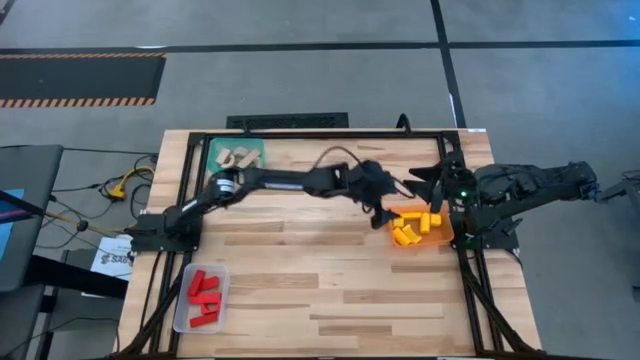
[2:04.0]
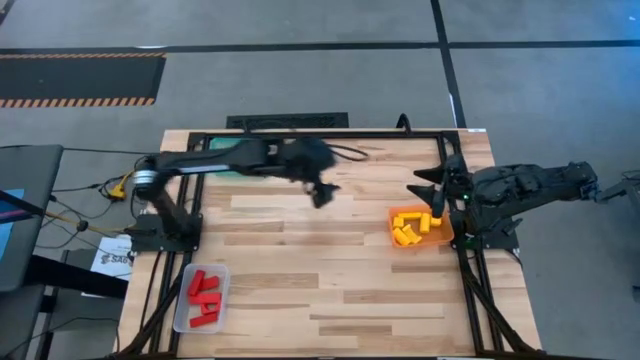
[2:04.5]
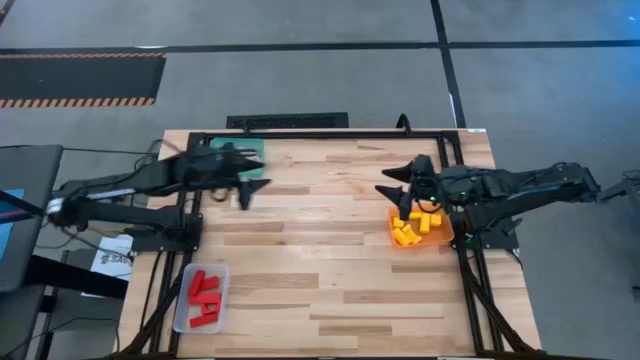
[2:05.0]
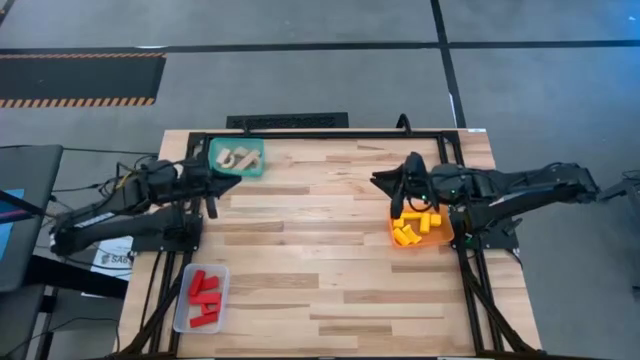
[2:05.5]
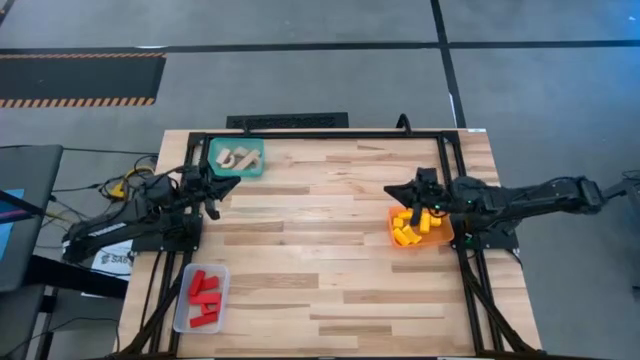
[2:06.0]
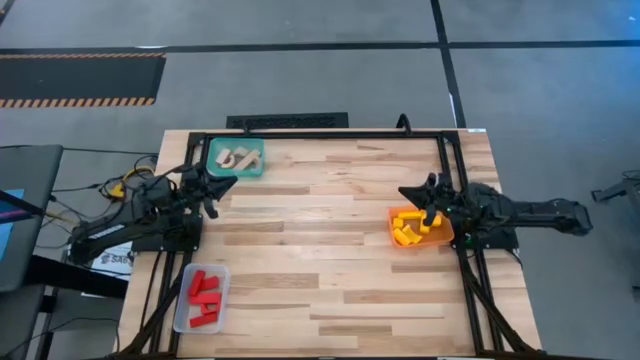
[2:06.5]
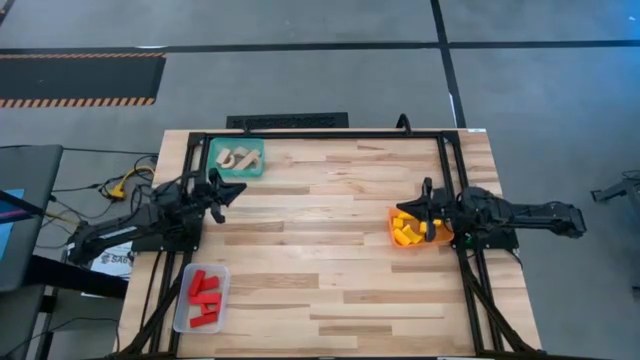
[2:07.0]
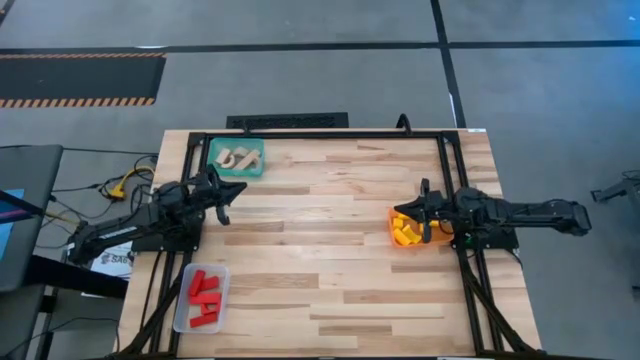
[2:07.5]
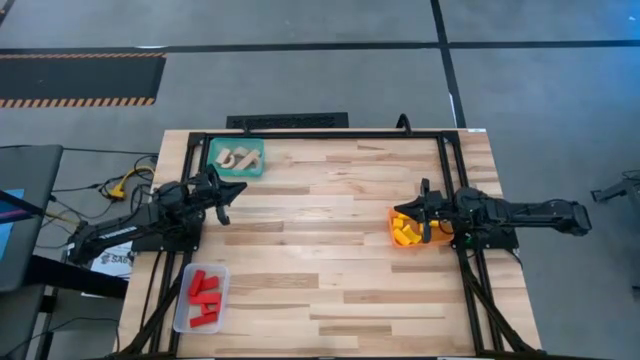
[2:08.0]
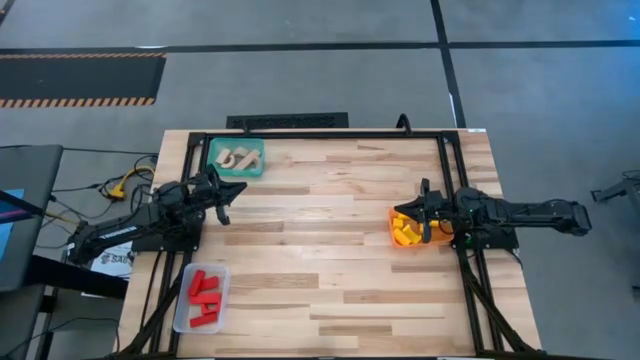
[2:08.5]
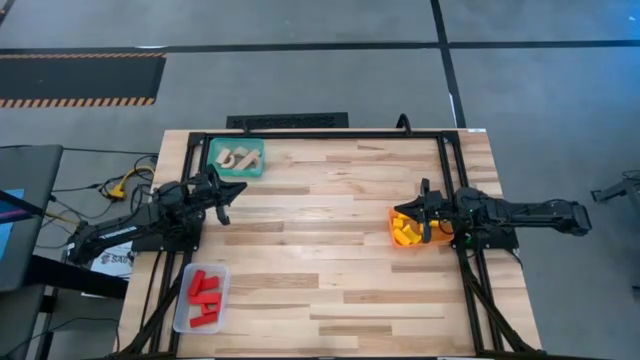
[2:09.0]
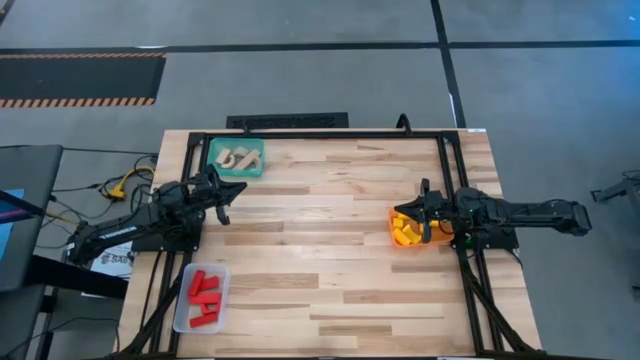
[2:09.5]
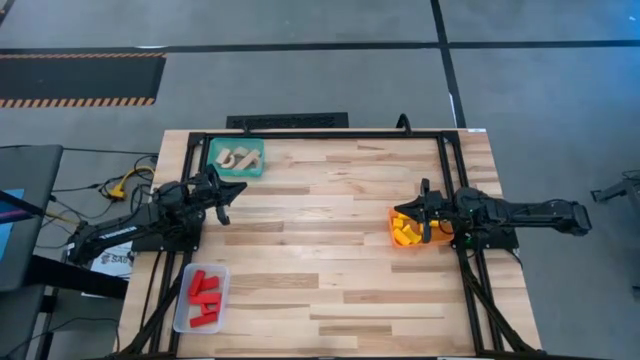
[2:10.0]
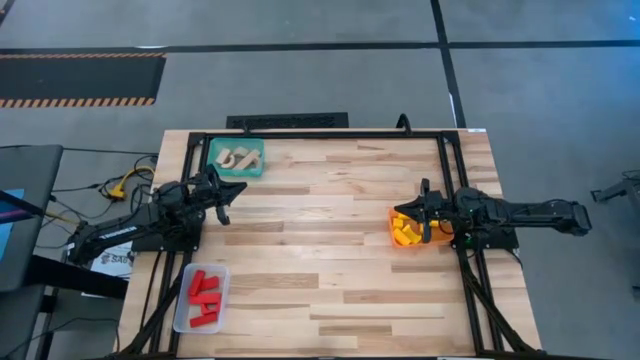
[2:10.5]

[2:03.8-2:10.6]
Task: Sort & place blocks by color
Return to Home Position

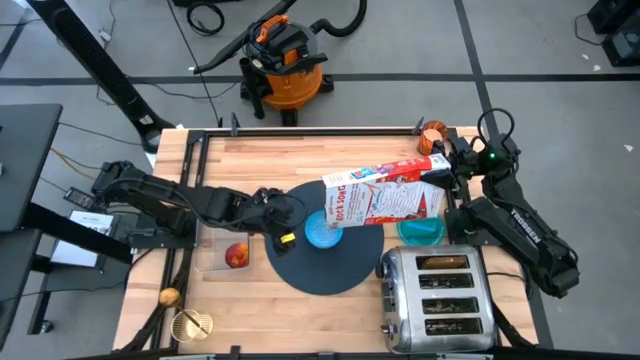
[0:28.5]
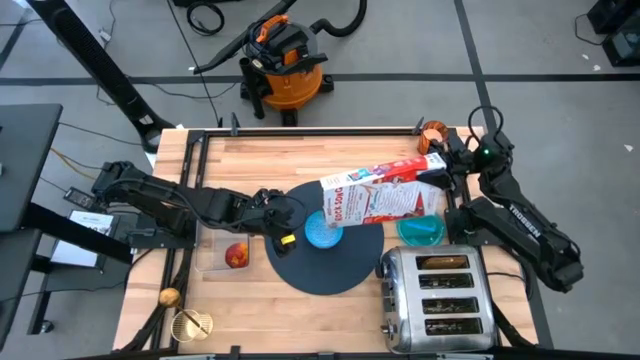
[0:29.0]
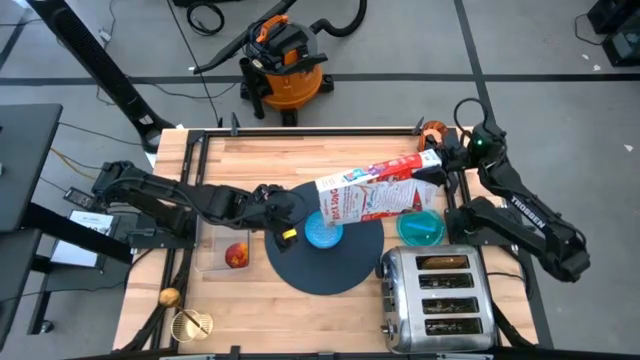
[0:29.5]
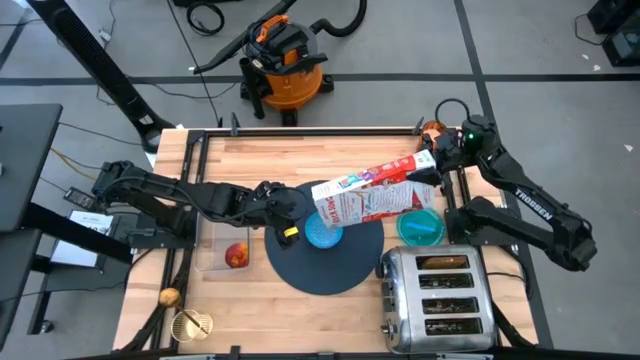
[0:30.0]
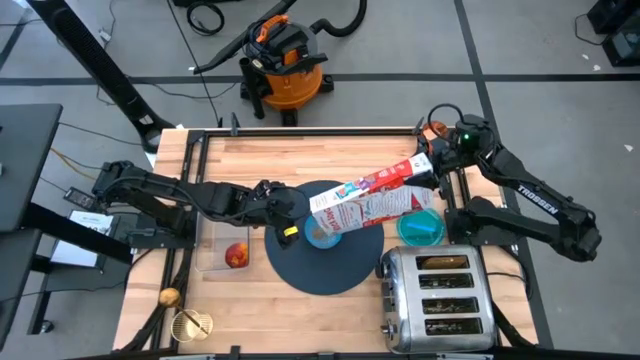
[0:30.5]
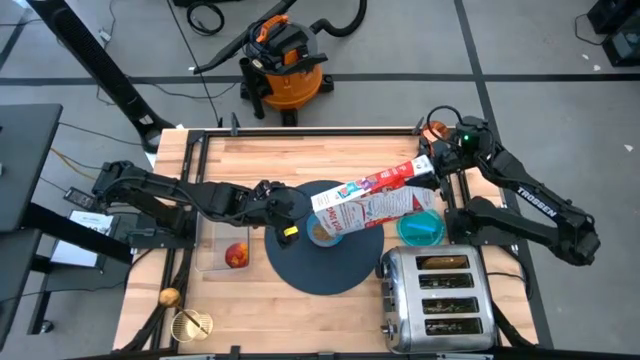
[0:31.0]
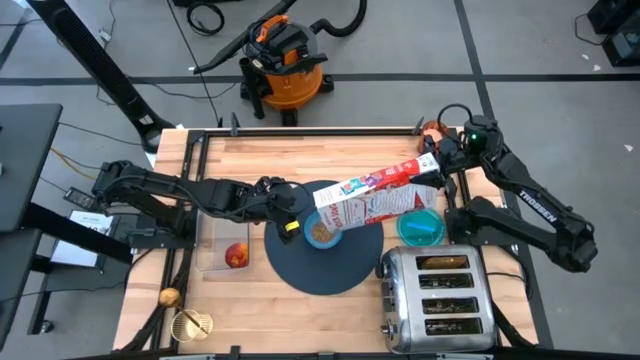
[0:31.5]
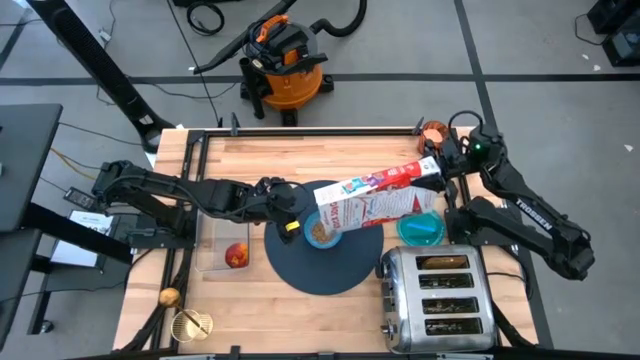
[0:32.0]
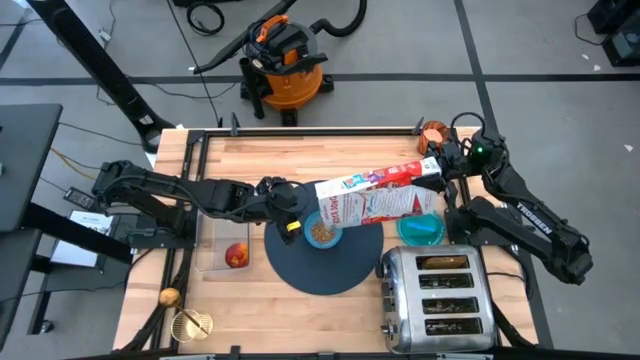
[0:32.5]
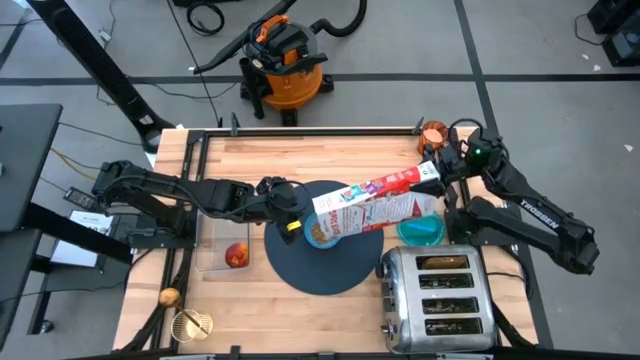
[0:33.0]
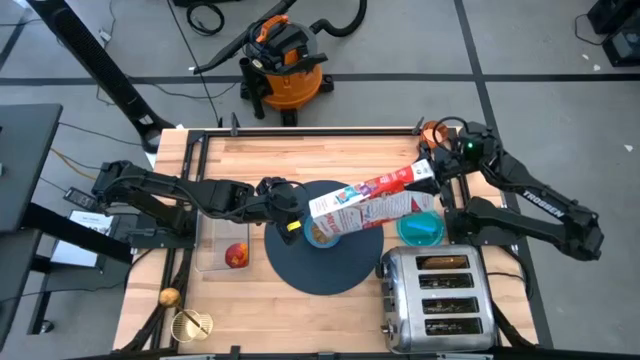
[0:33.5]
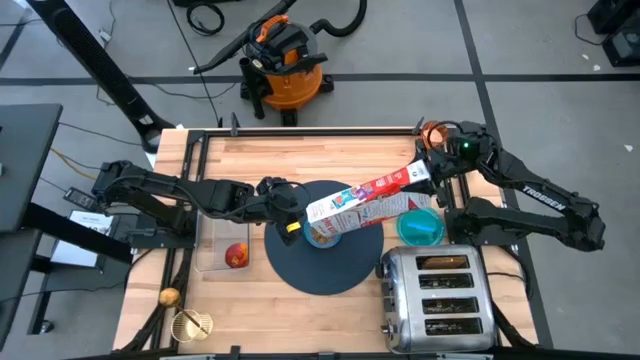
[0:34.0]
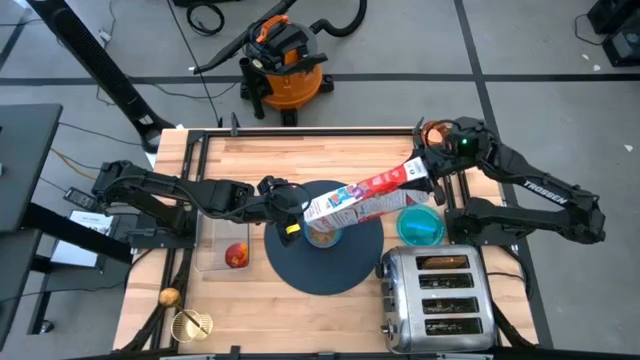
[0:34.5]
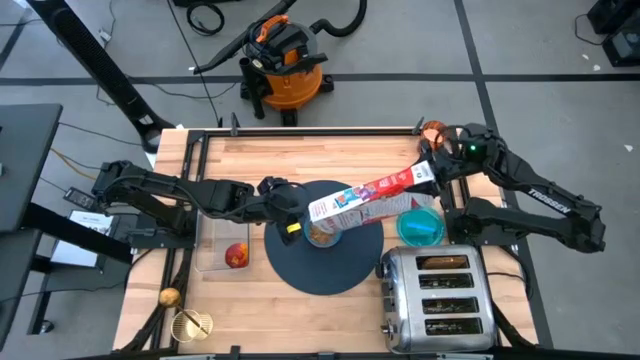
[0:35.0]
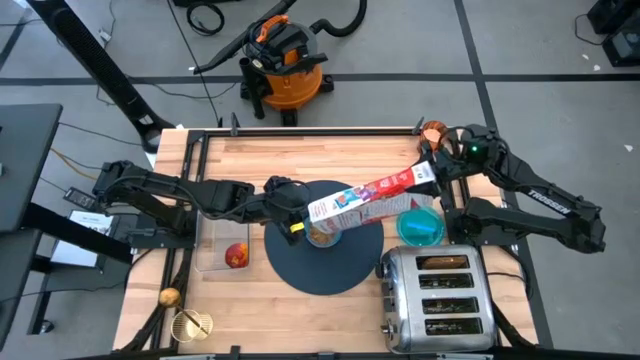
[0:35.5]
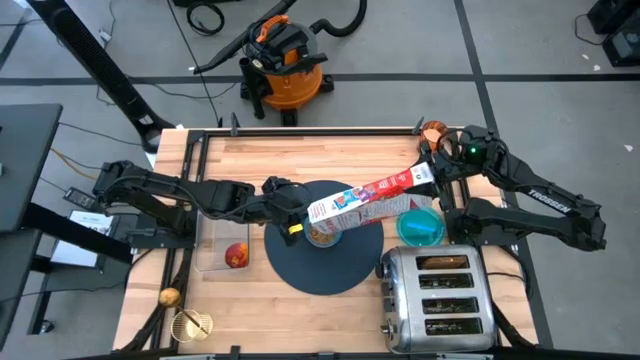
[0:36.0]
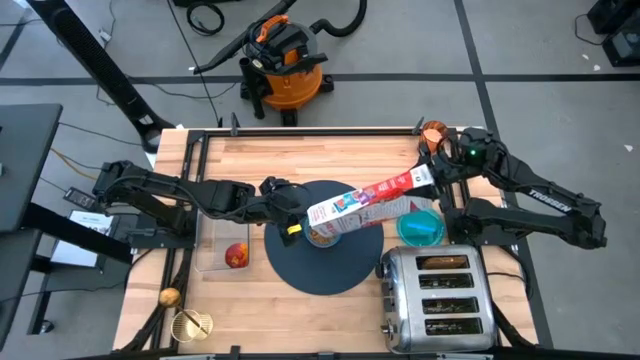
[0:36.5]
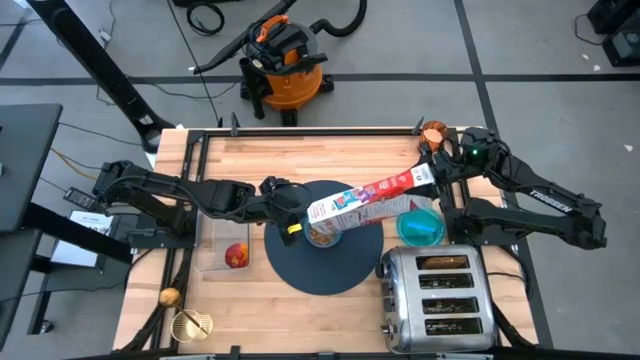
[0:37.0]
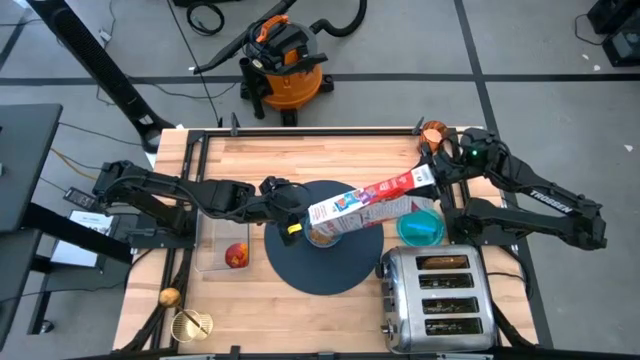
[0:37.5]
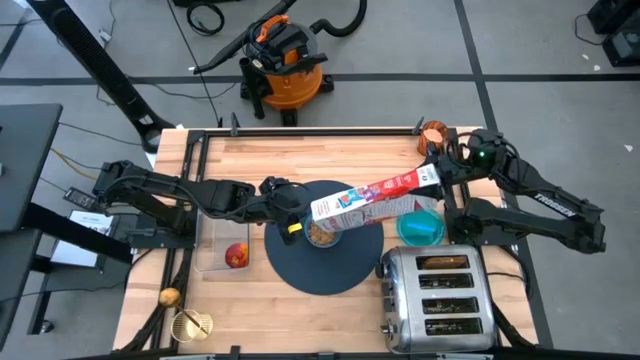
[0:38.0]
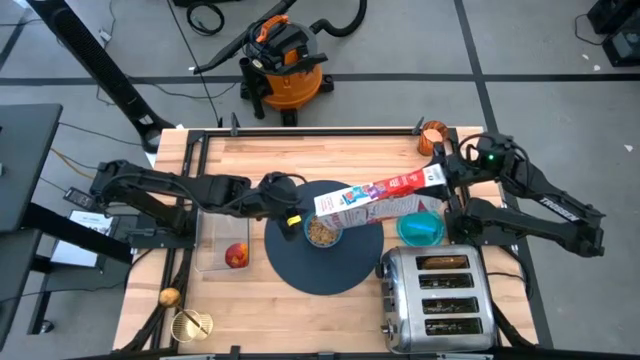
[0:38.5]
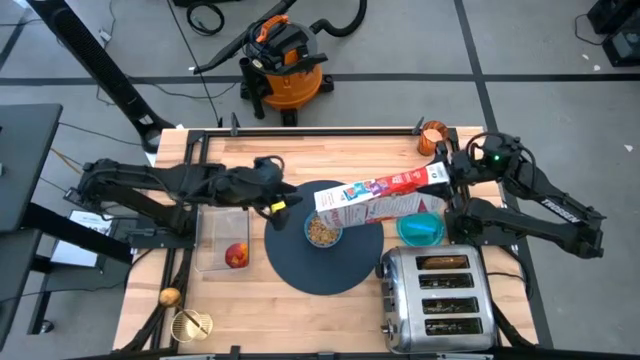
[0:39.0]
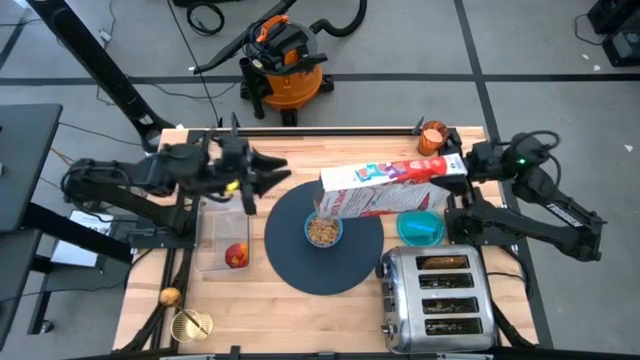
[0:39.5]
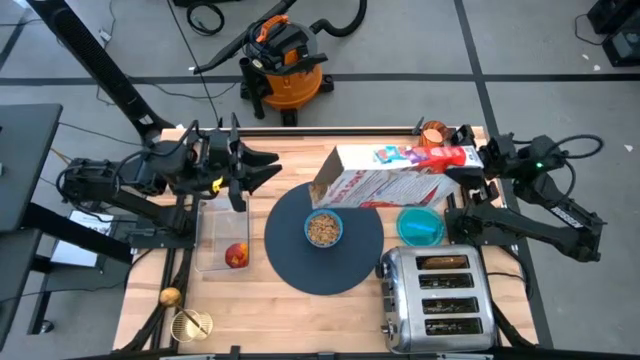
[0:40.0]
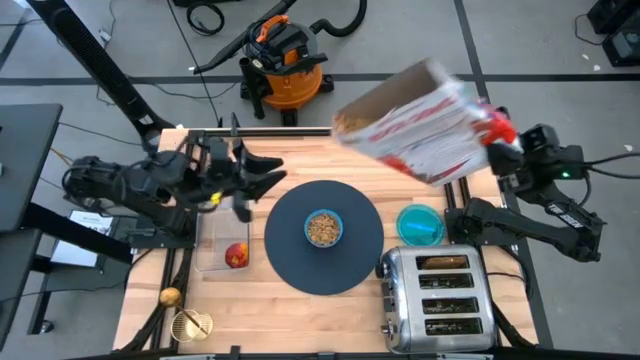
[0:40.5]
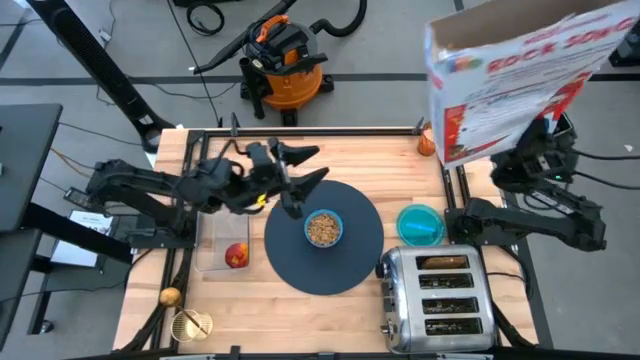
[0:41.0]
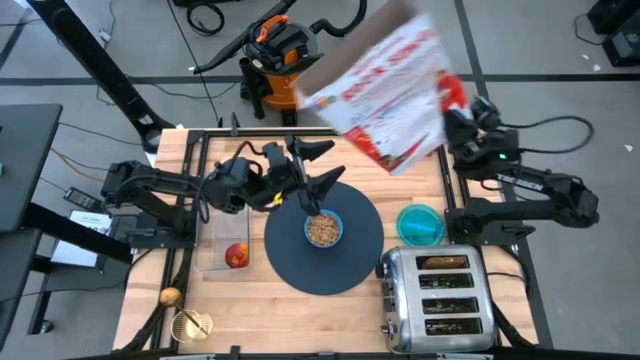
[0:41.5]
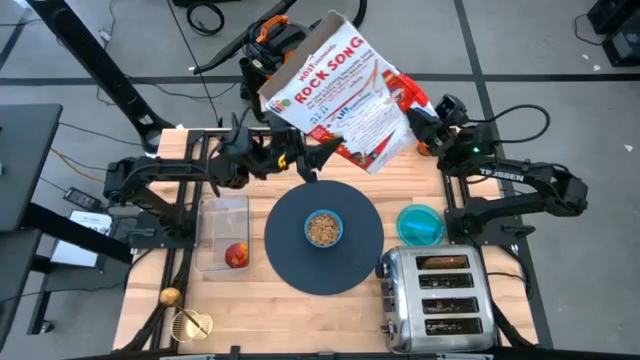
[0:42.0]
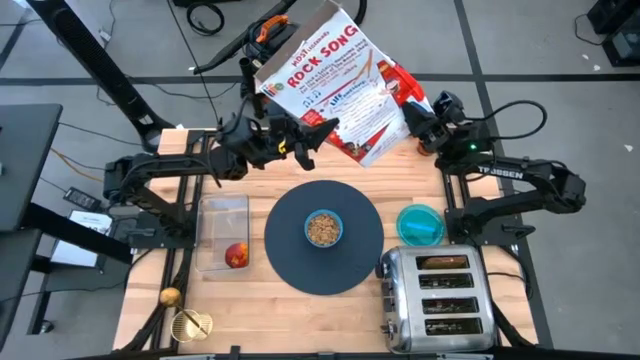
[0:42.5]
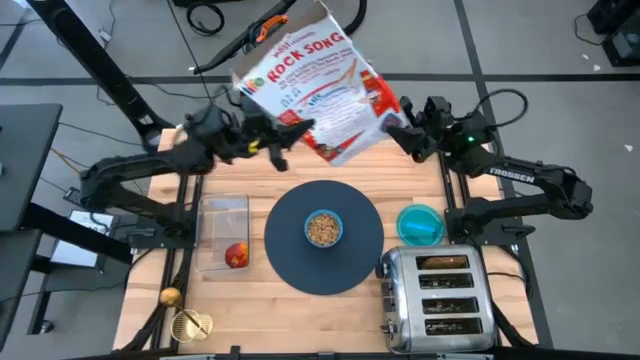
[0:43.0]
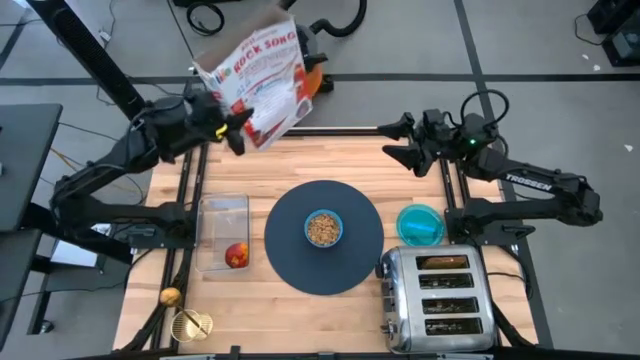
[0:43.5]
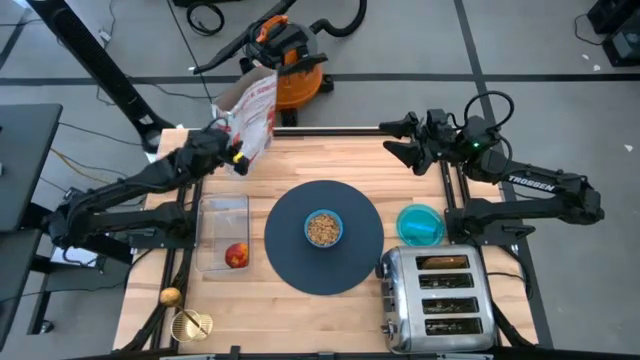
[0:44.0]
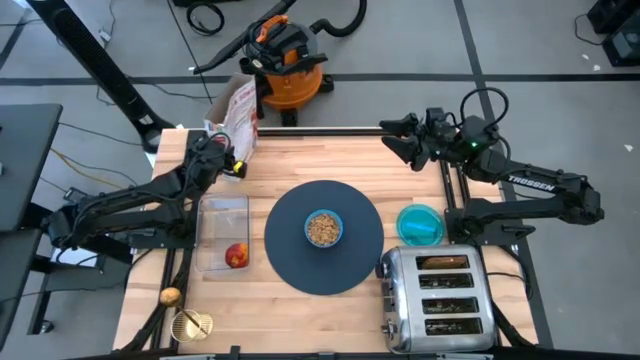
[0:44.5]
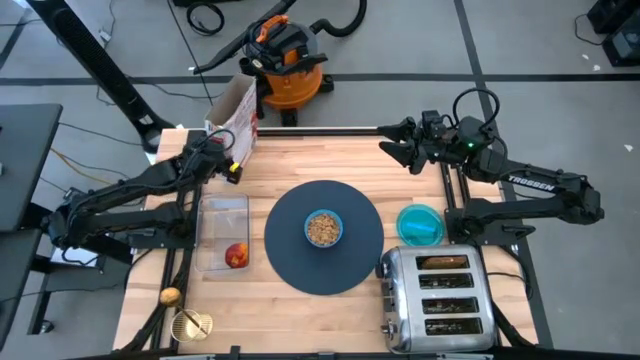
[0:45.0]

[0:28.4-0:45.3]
Task: Arrange a breakfast setting
Pour the cereal from the cereal box into a blue bowl
